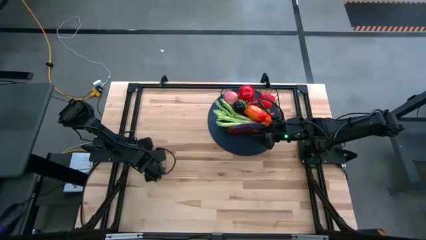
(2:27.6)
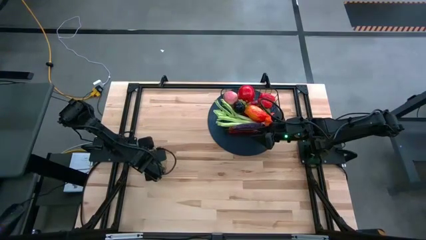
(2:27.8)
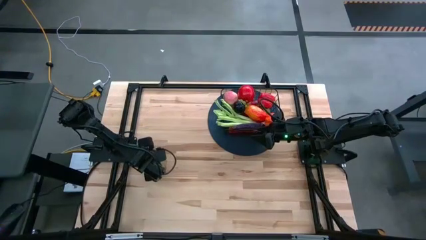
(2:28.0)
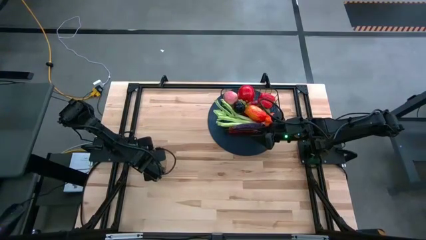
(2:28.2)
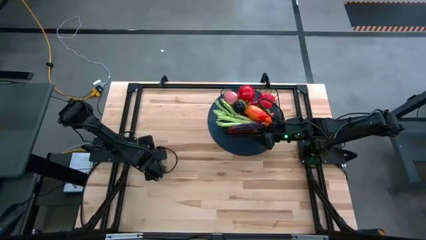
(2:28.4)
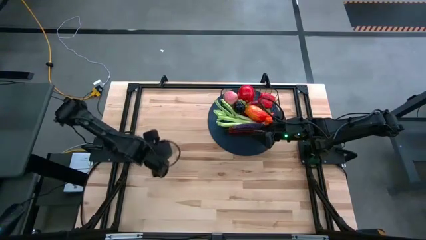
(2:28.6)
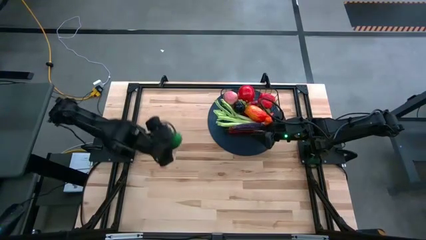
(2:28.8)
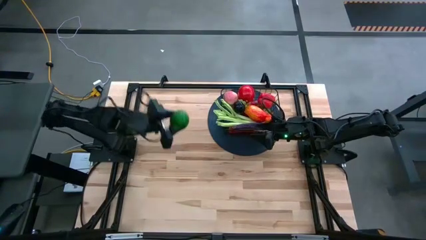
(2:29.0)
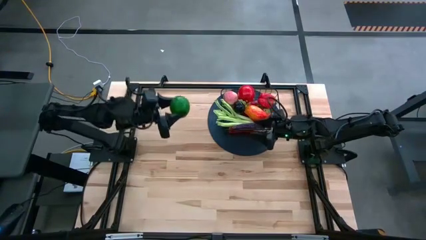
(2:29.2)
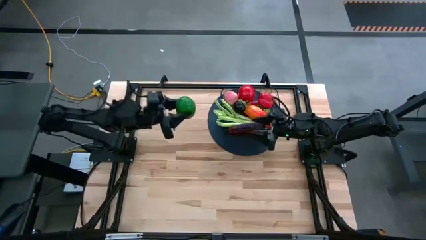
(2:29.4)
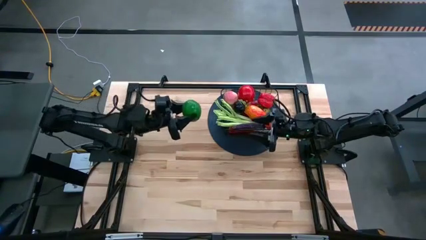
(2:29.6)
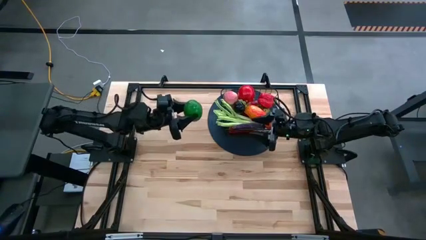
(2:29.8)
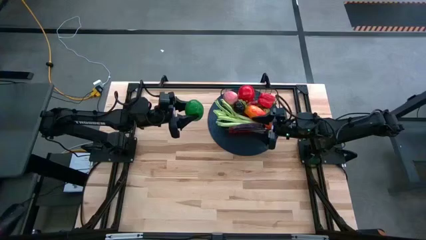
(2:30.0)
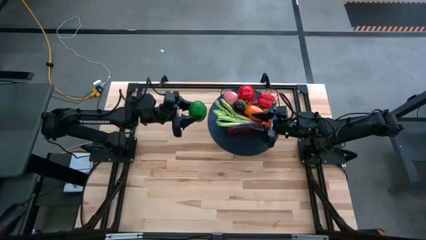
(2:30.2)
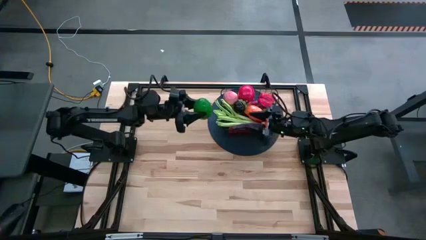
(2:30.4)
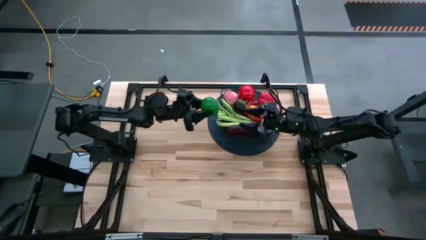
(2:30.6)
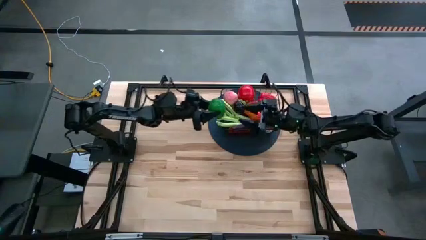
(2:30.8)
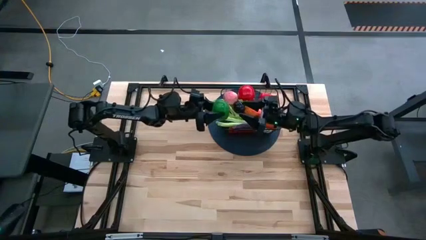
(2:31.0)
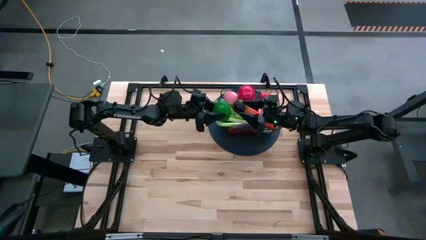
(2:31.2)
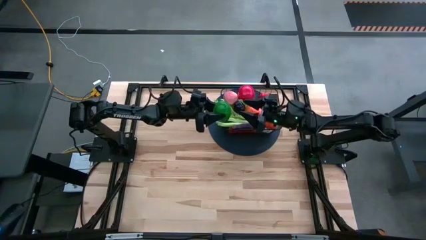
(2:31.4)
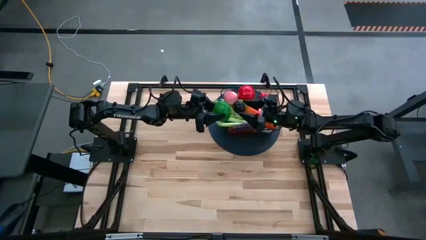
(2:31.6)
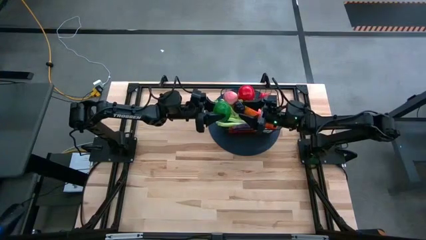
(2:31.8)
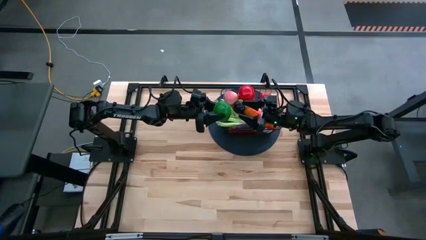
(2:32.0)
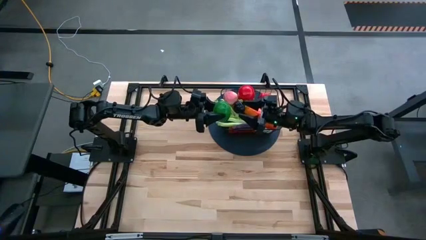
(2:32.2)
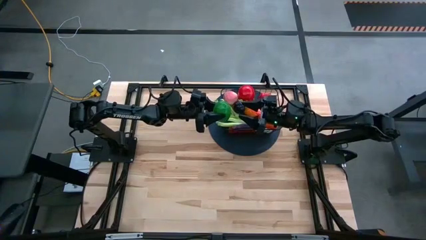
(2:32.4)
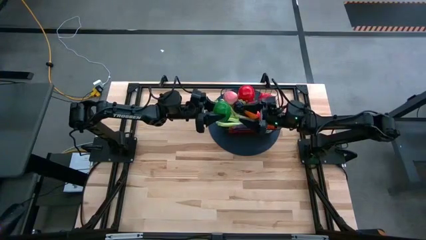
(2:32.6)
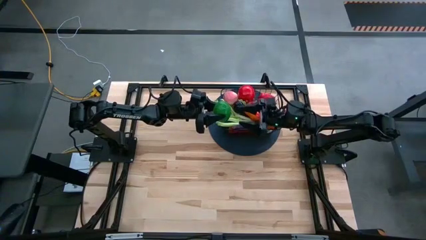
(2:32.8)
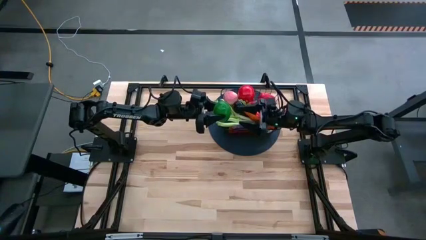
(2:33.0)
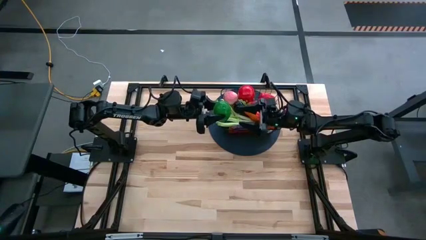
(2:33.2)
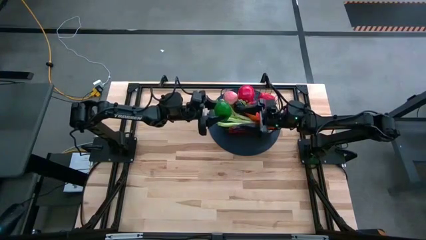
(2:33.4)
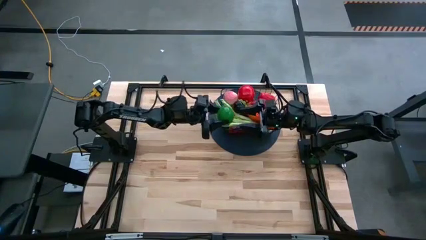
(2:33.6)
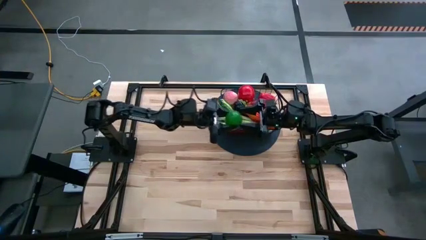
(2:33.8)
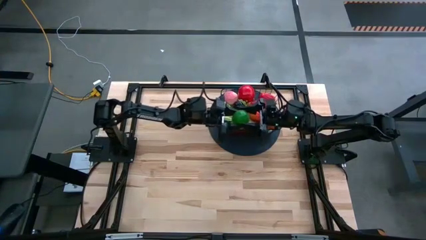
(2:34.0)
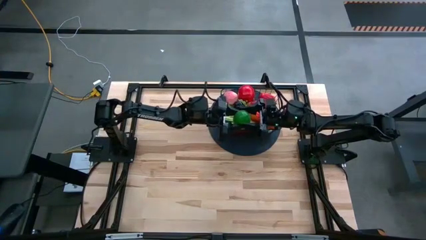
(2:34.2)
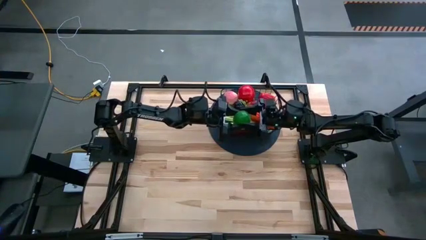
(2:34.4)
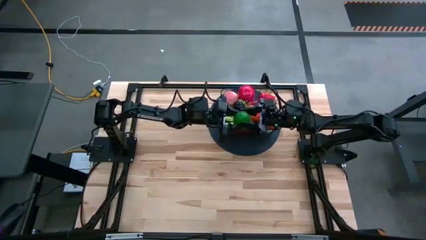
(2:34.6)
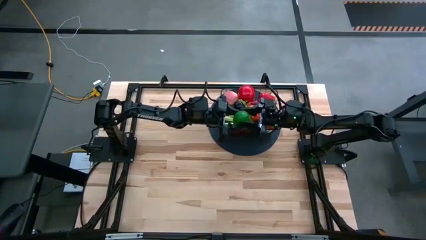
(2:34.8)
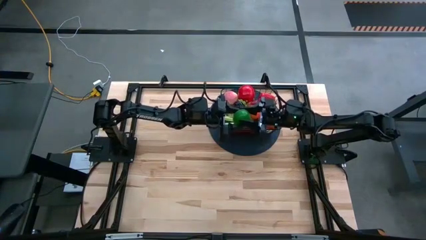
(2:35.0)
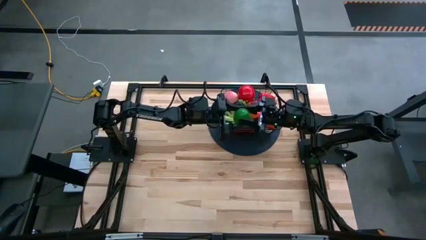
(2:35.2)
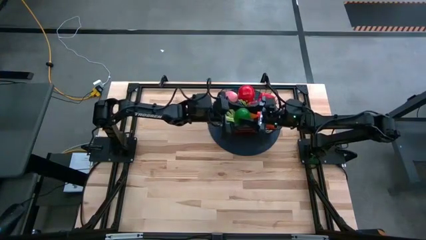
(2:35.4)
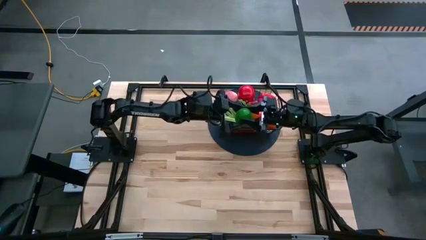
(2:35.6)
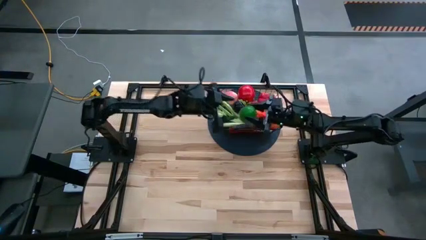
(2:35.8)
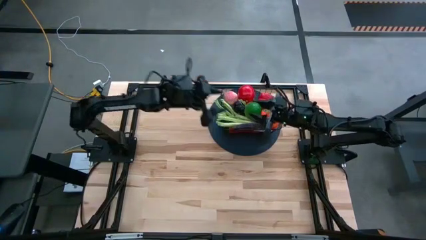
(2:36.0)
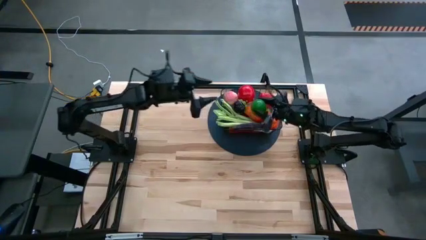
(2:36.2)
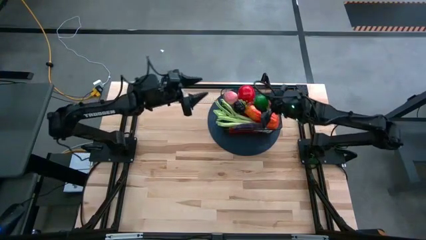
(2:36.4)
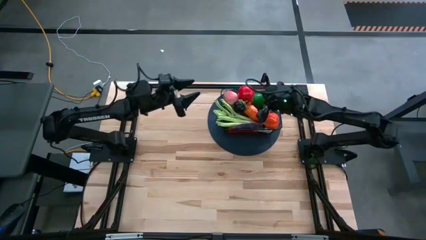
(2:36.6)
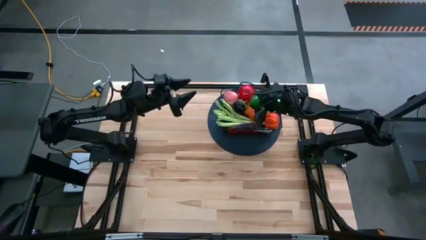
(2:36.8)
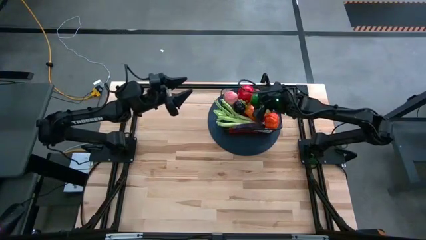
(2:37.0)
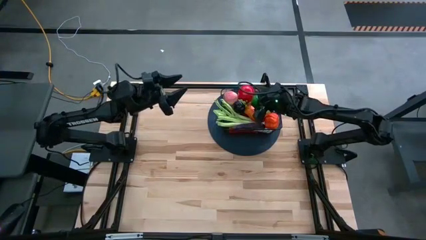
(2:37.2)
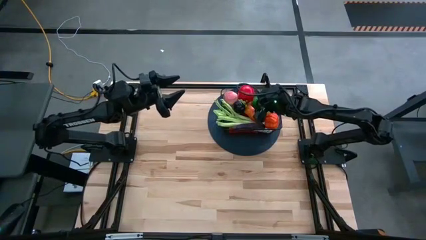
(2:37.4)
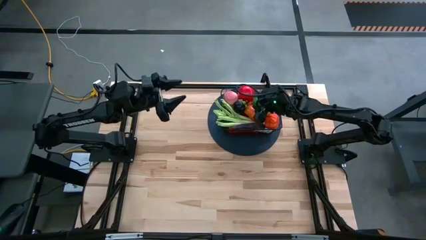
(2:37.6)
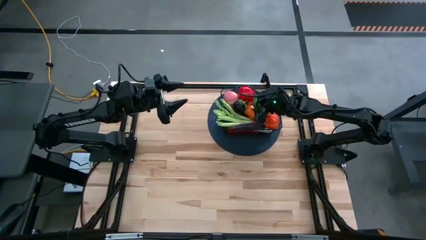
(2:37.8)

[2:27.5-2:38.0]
Task: Build produce basket
Put the lime into the black wire basket

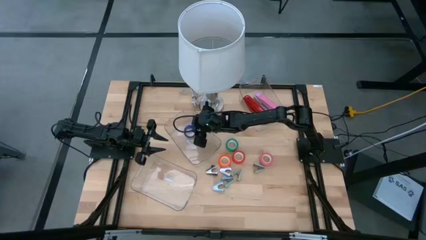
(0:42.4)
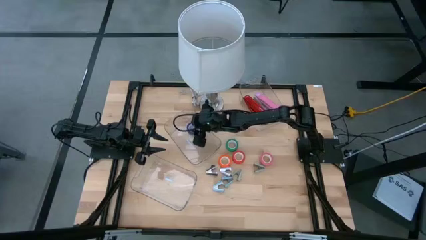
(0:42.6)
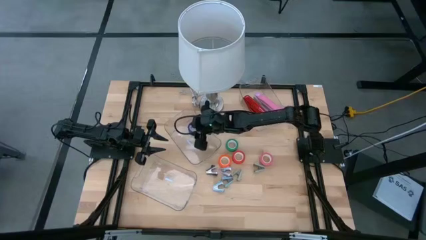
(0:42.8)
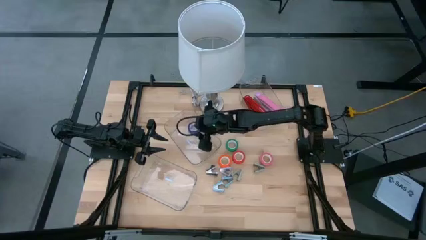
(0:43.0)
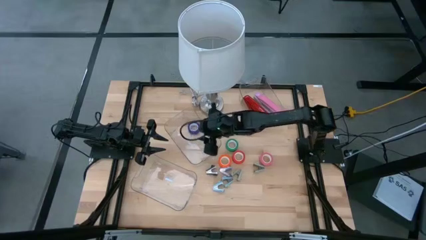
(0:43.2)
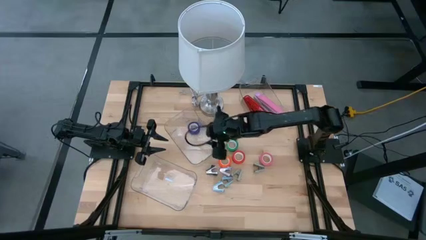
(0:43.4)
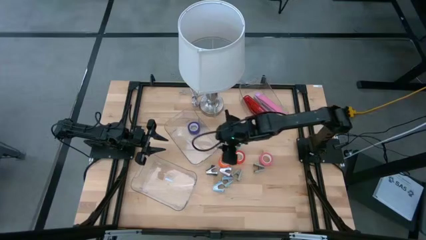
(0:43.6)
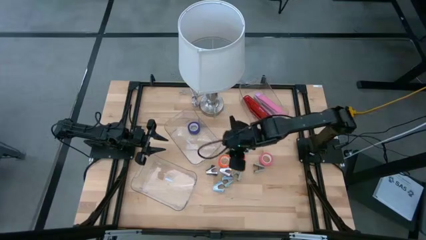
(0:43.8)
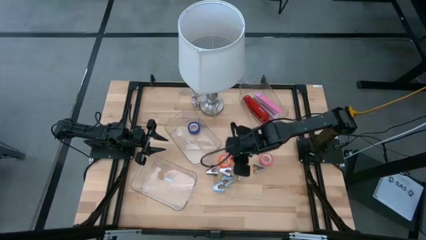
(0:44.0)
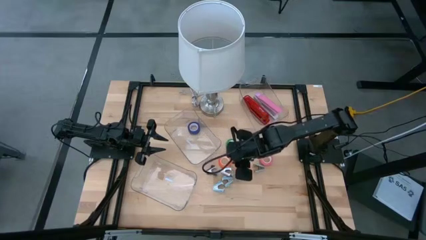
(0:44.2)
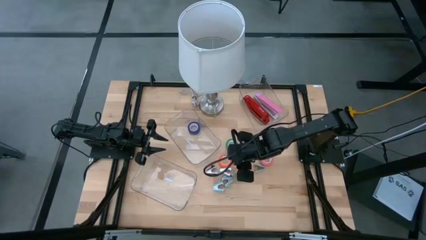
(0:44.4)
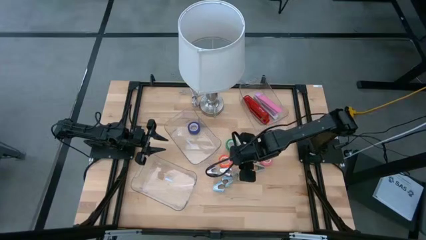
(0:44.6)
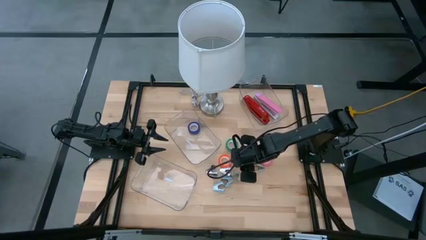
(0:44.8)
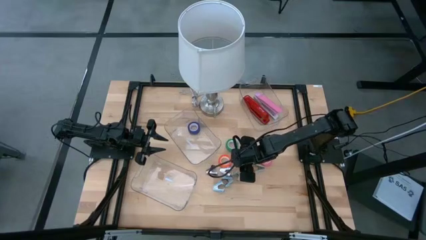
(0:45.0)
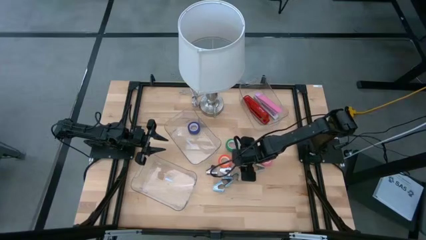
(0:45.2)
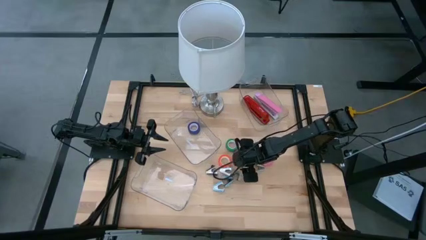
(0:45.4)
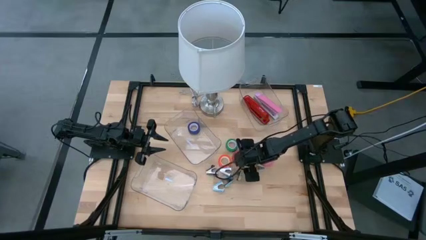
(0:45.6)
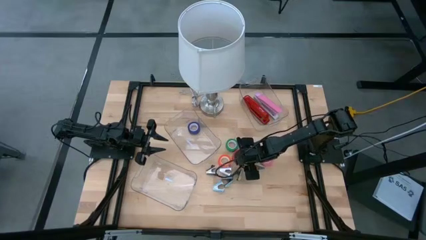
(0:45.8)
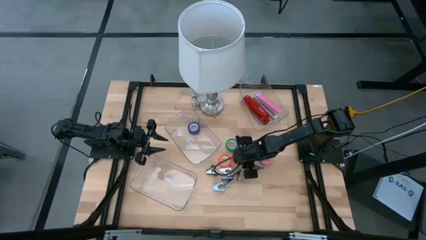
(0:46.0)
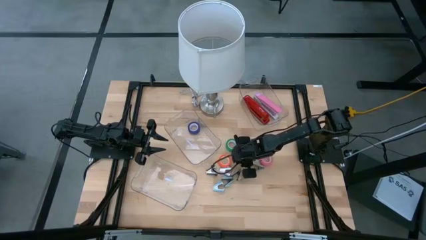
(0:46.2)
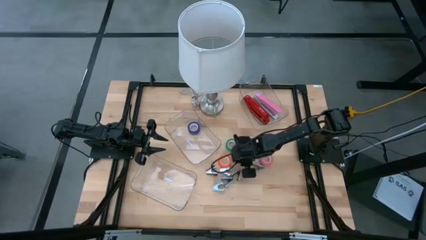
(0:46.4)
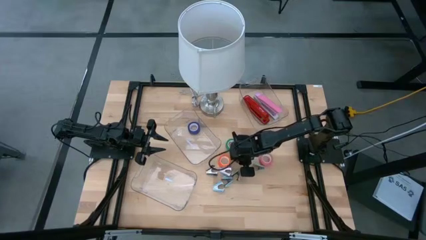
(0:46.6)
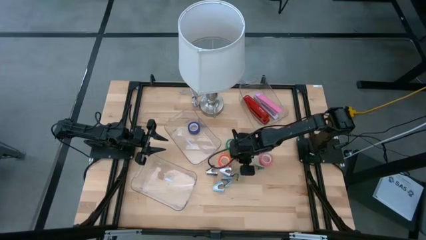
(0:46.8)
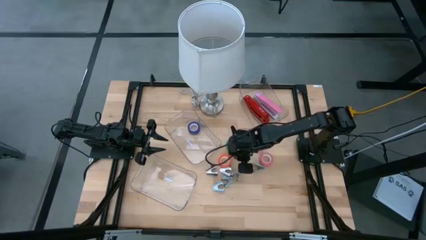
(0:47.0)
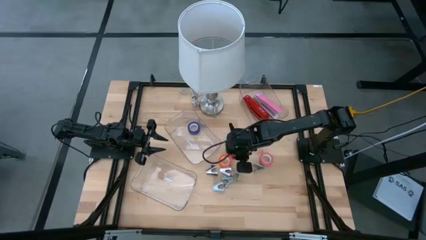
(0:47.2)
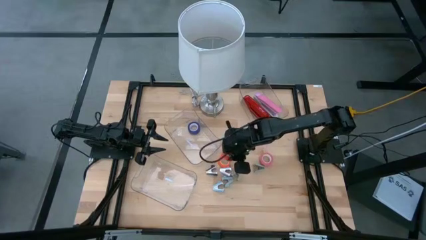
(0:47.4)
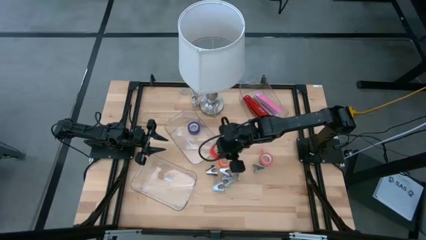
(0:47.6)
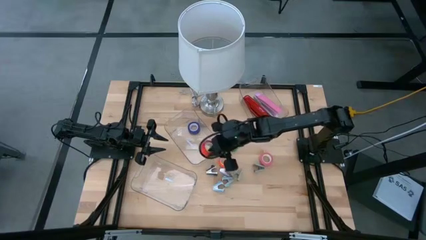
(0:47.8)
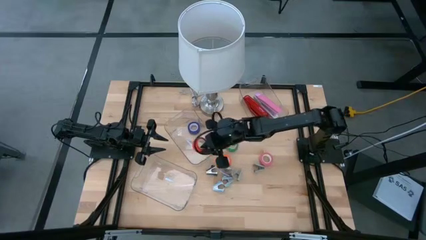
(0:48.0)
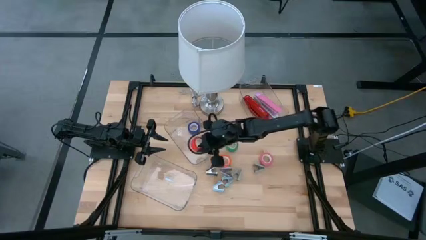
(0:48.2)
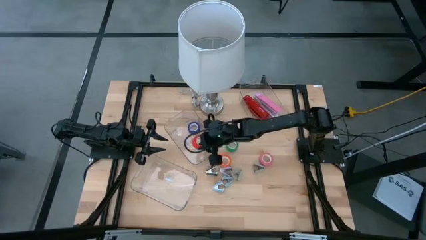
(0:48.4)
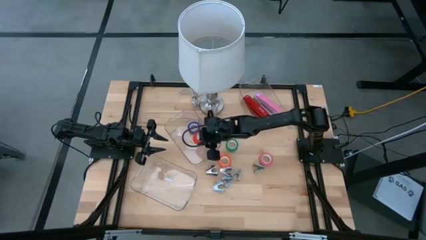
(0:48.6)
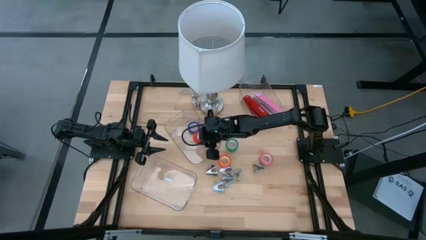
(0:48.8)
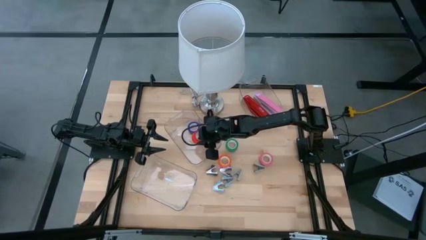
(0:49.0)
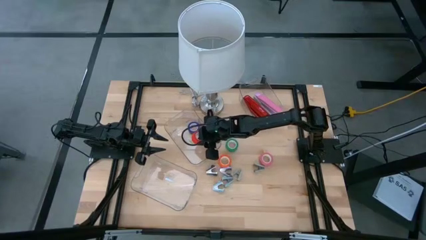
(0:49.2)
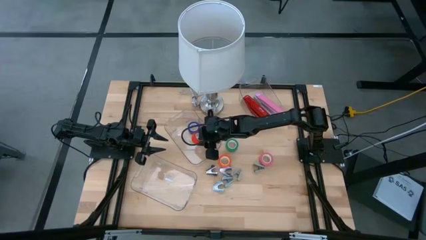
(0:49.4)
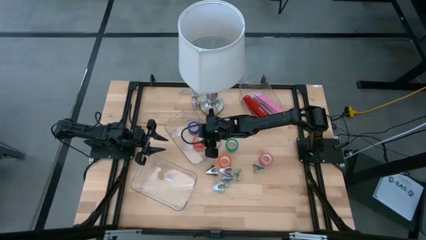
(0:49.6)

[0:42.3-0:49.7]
Task: Pick and place Stapler, Stapler remover, tape
Put the red tape into the middle transparent bin
